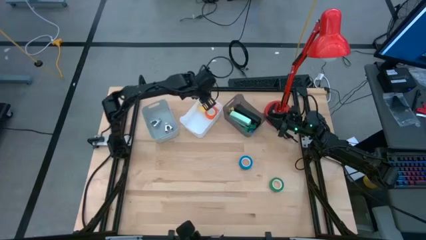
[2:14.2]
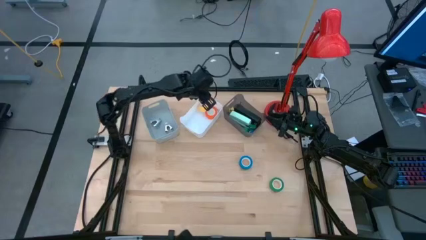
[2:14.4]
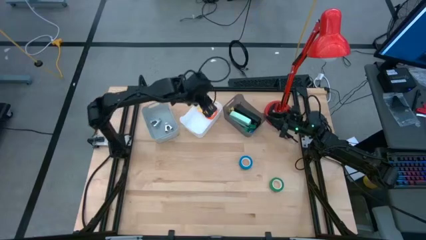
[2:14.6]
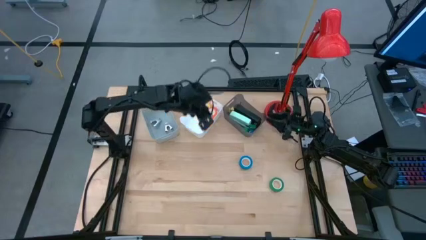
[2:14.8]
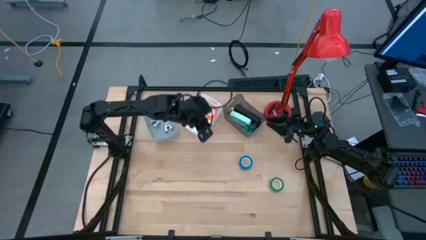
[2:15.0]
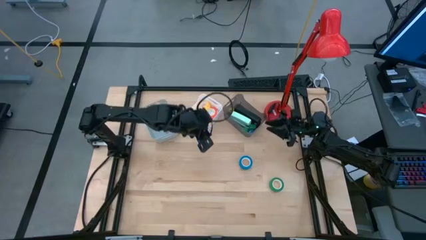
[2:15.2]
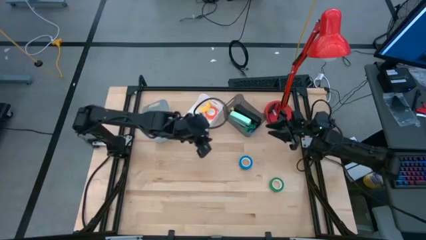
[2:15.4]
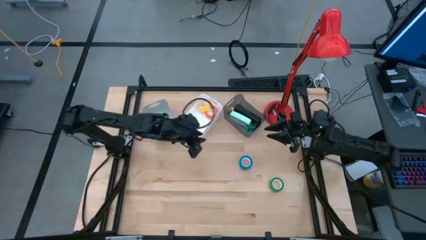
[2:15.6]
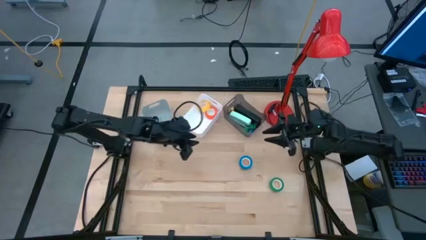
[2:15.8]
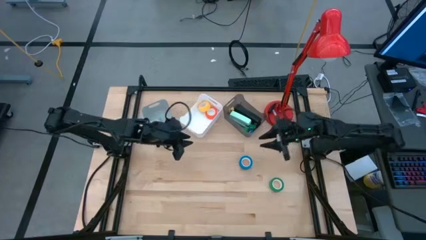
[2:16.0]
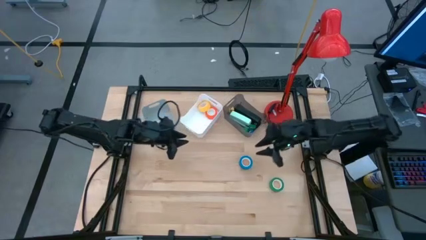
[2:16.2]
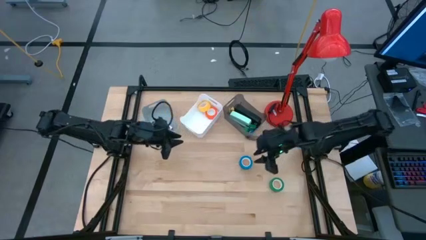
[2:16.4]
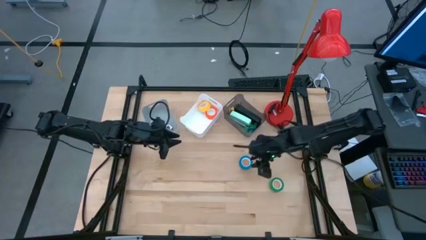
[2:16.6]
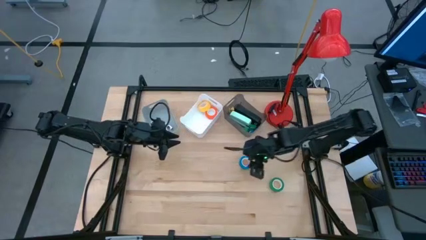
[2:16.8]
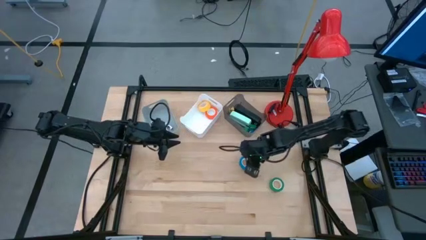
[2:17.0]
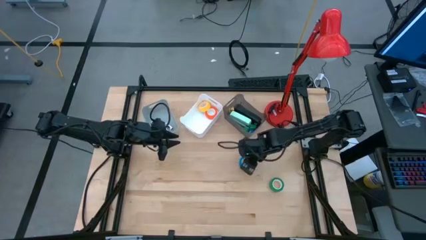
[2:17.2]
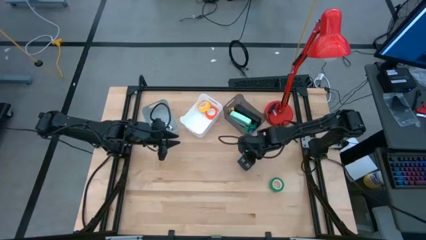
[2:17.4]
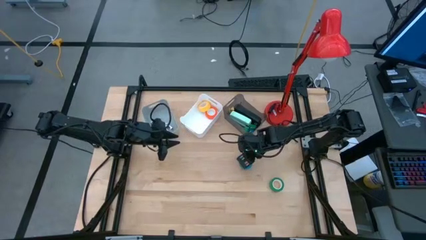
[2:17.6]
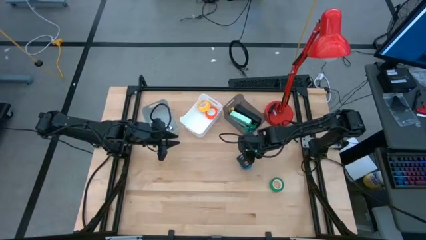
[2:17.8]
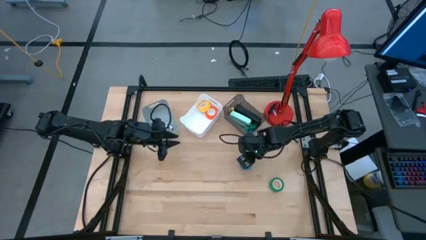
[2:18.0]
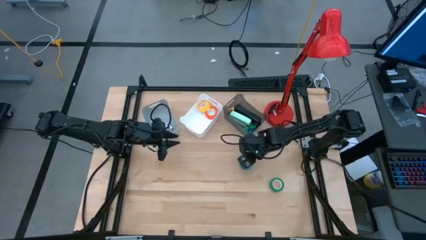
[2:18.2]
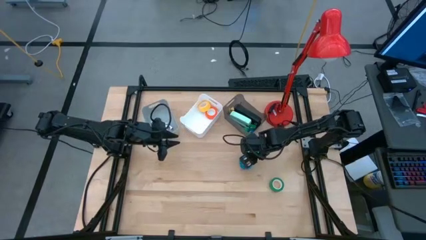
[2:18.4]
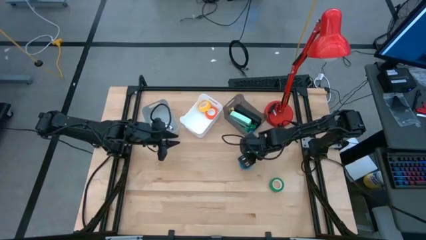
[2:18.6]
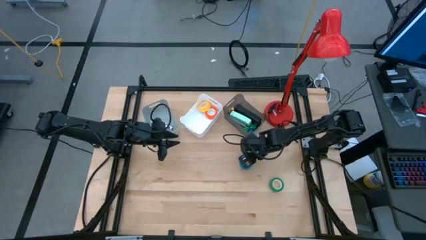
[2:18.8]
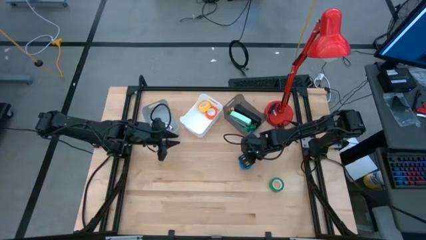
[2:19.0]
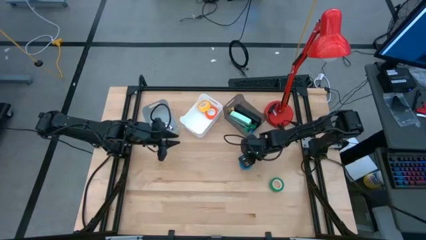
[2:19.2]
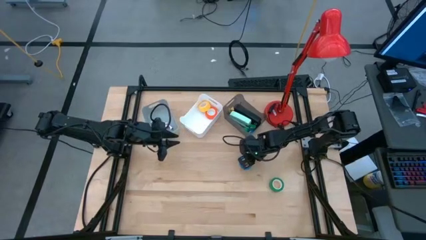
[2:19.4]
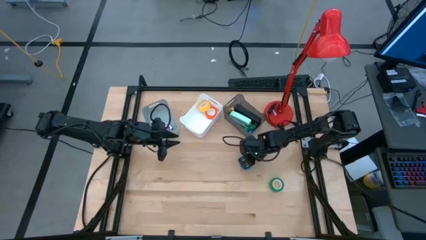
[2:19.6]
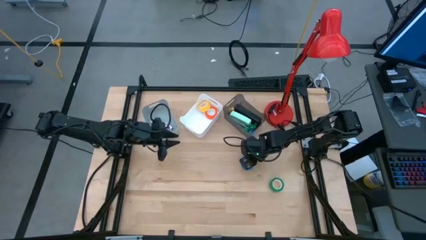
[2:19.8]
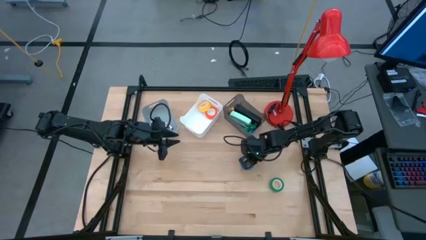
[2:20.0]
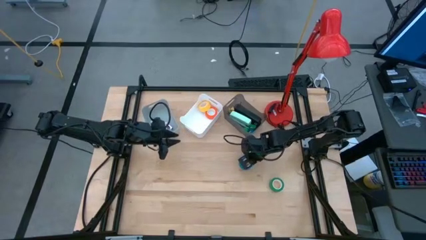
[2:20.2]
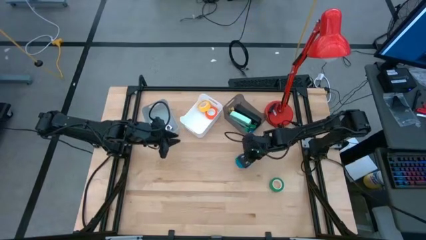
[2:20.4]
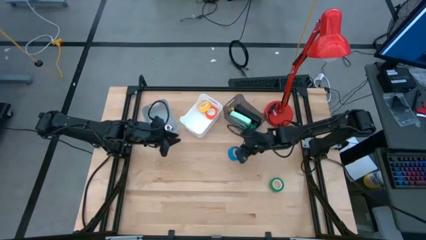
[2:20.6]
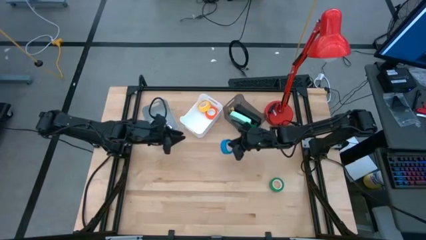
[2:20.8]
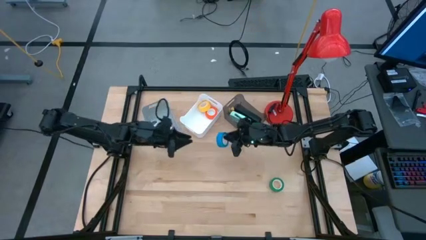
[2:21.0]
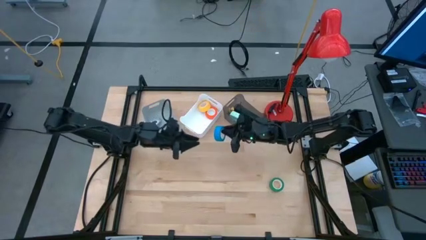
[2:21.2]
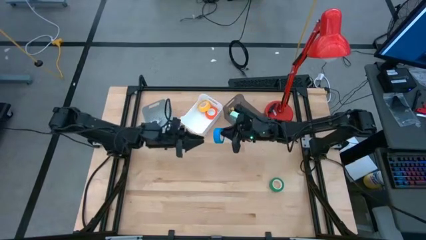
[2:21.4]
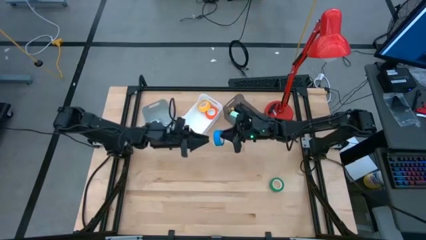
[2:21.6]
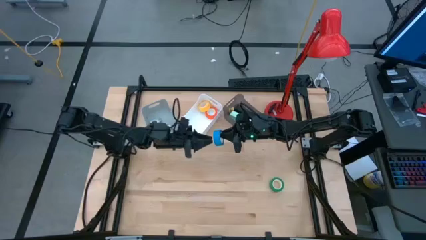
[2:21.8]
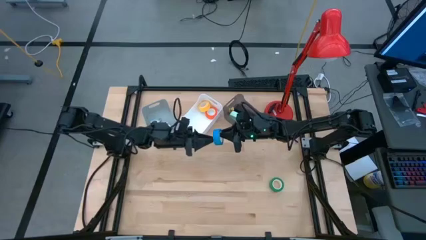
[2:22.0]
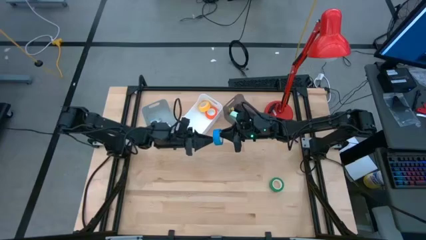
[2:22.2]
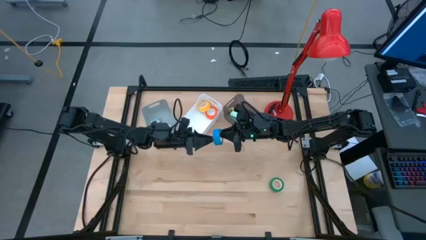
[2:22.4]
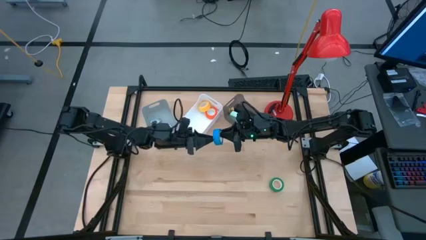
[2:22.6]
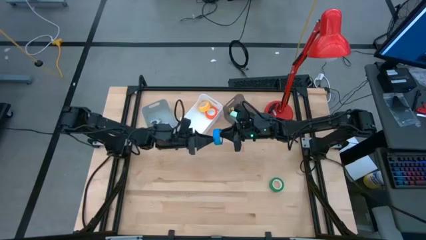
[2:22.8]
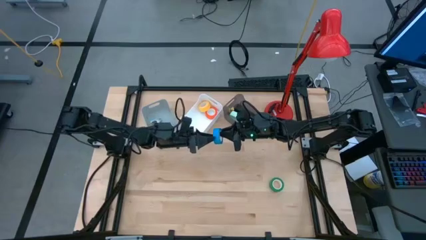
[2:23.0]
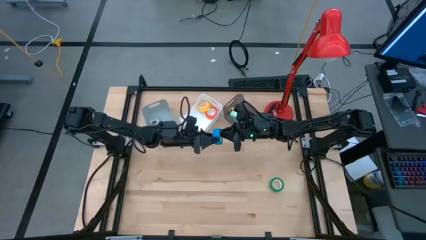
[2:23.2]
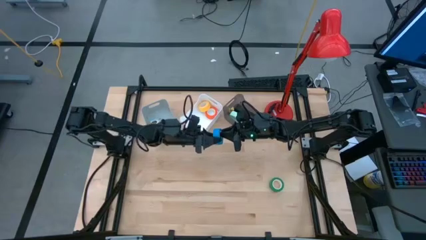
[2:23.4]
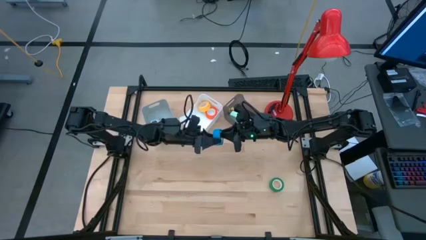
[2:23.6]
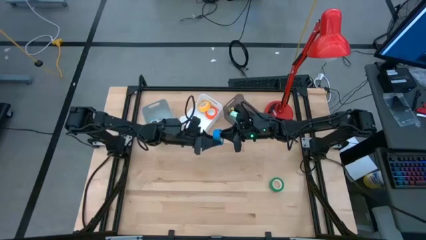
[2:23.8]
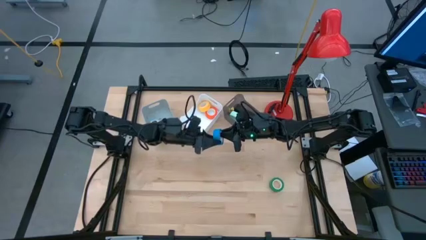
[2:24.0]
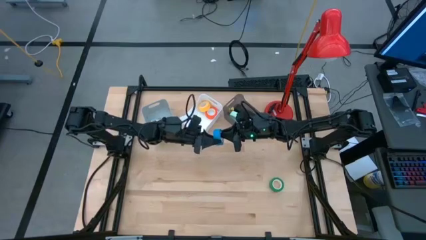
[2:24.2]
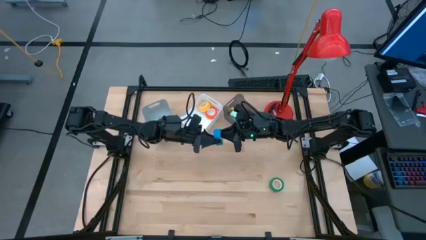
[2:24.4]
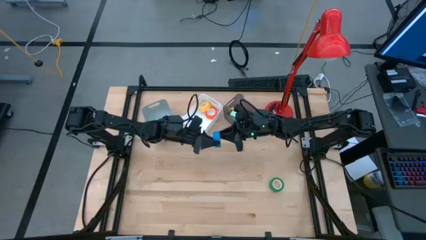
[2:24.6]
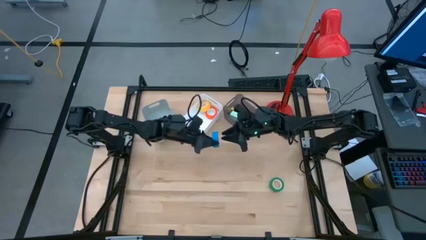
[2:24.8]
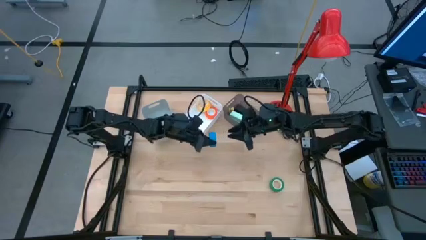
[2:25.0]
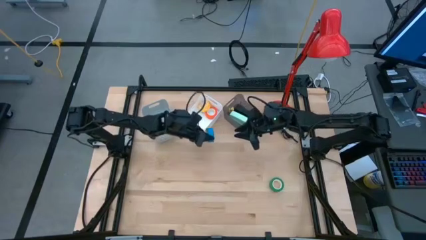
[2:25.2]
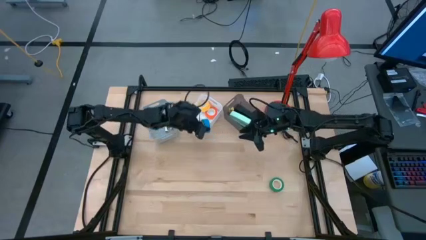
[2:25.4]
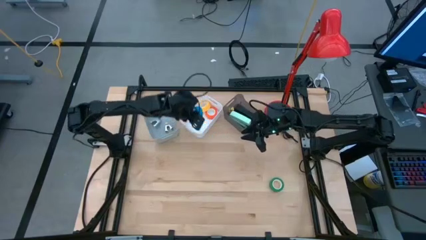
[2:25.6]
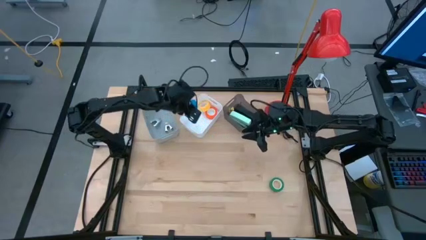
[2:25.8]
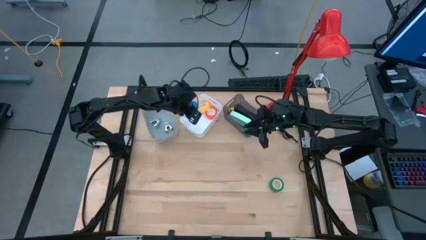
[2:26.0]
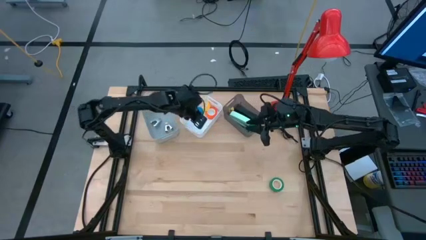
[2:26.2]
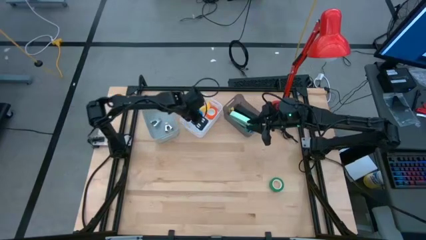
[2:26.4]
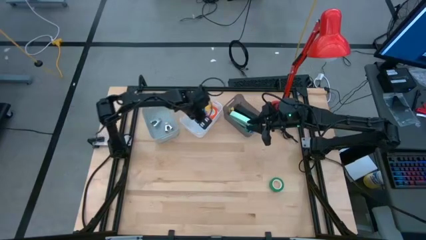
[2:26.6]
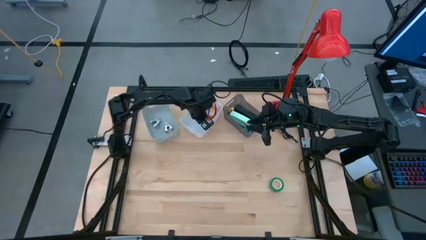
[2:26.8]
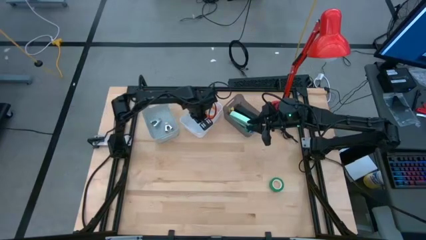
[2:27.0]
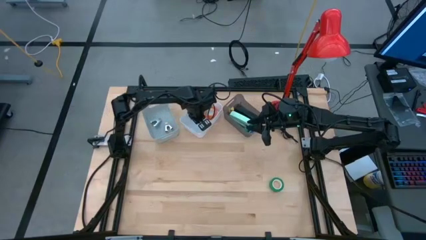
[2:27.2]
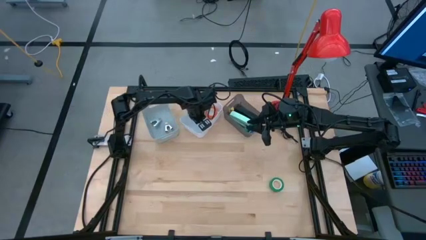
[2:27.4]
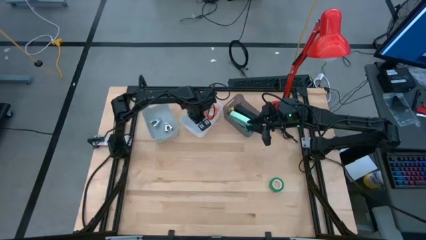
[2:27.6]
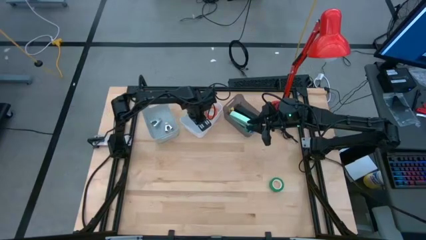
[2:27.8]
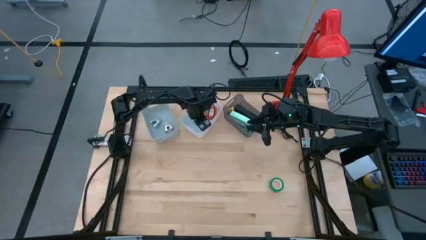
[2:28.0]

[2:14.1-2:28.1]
Task: Pick and place Stapler, Stapler remover, tape
Put the blue tape into the white bin
